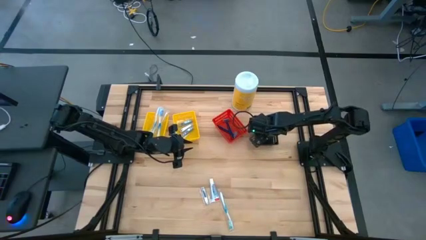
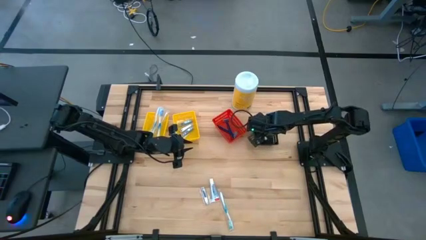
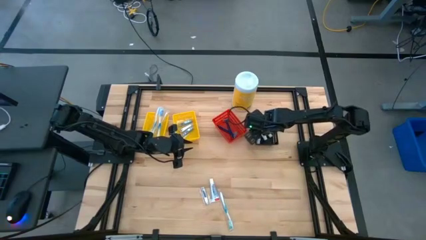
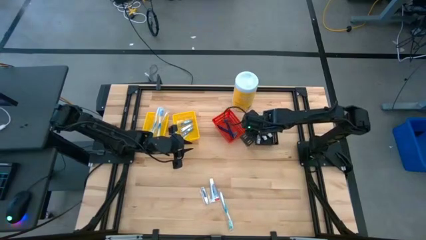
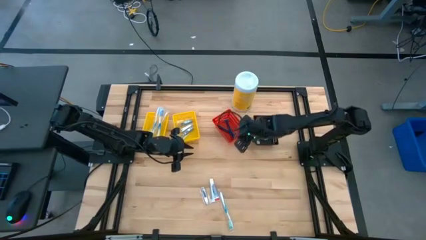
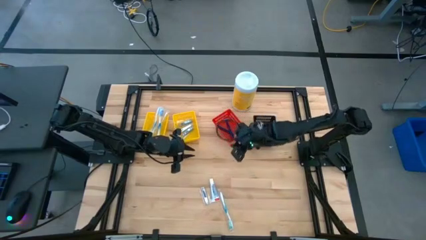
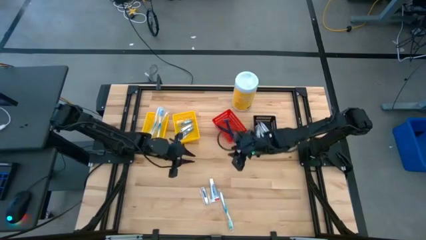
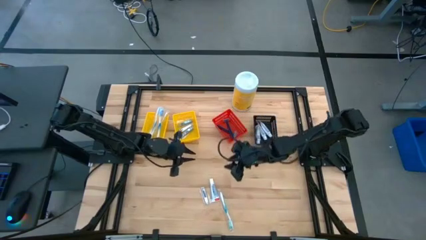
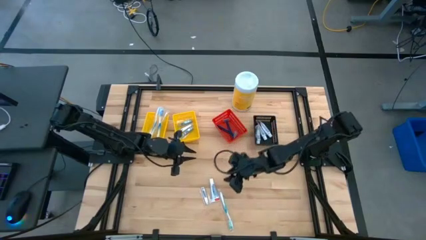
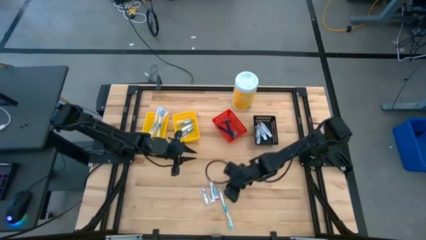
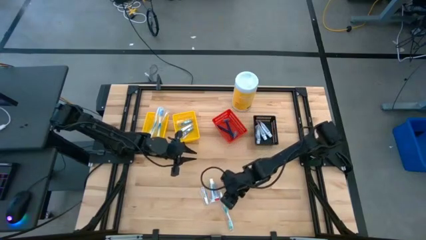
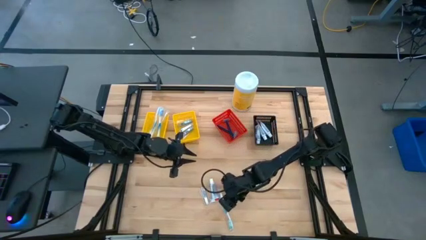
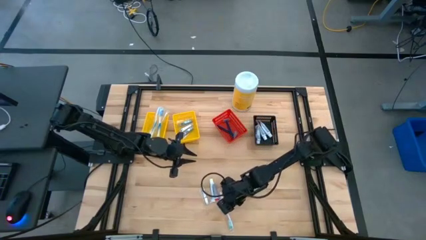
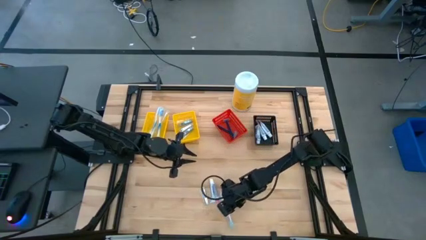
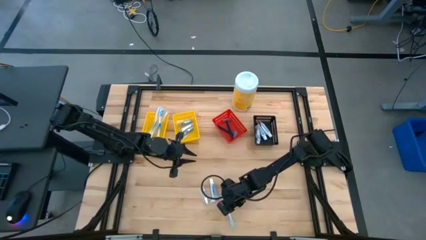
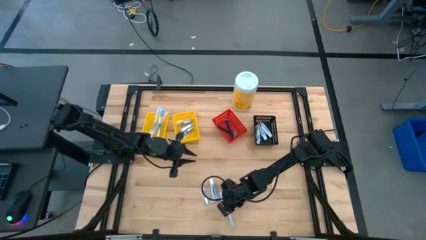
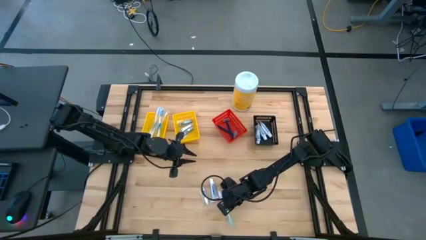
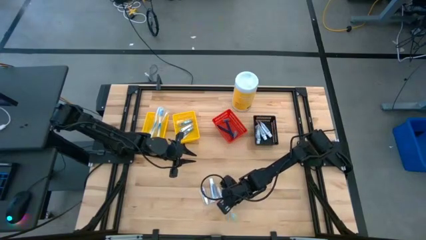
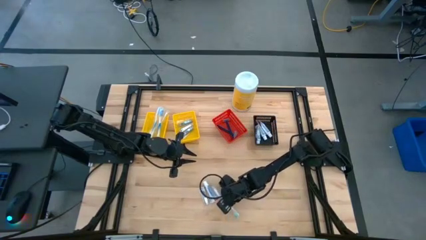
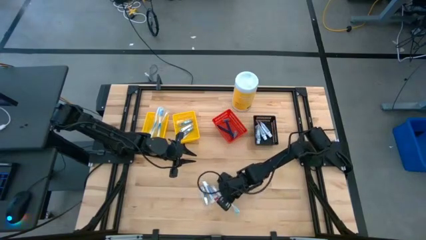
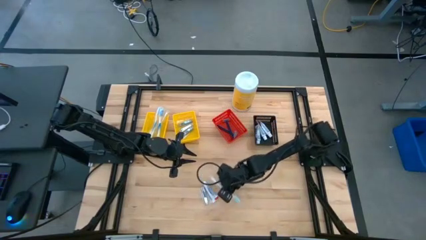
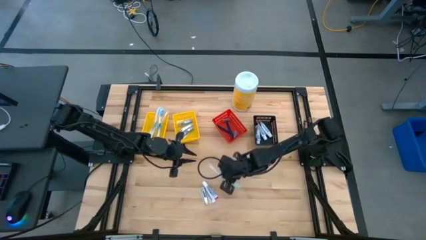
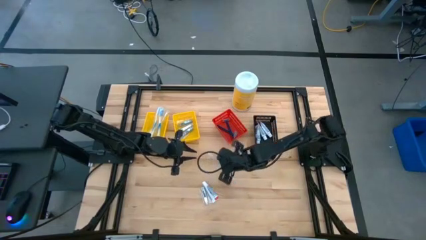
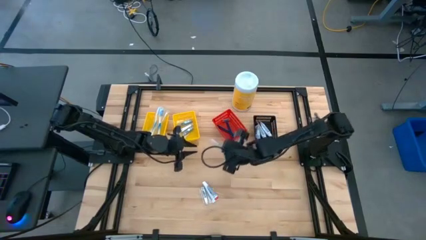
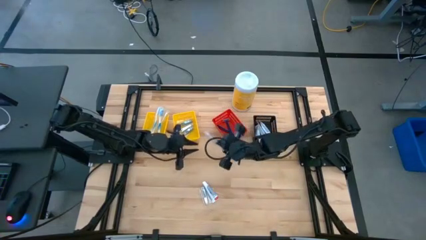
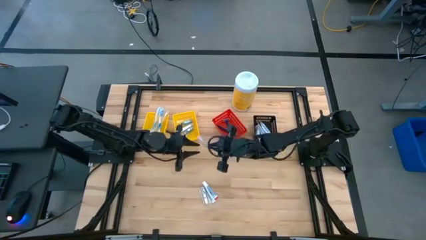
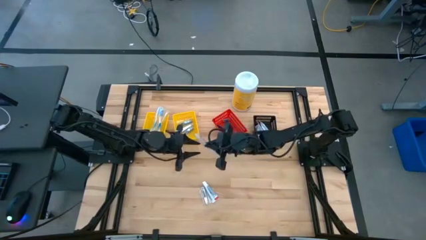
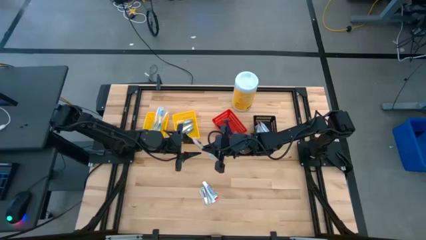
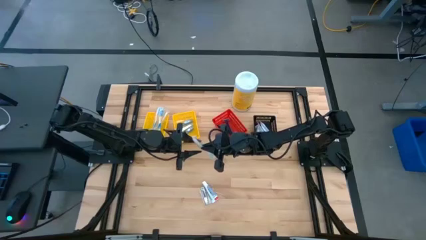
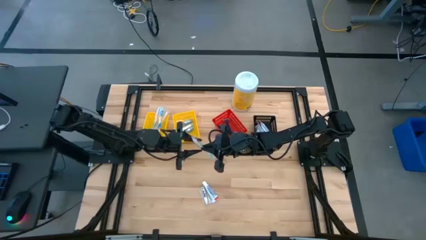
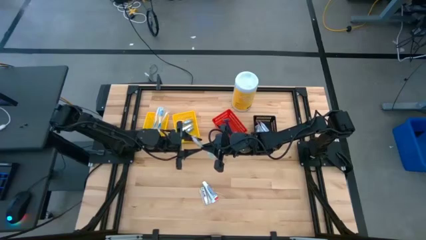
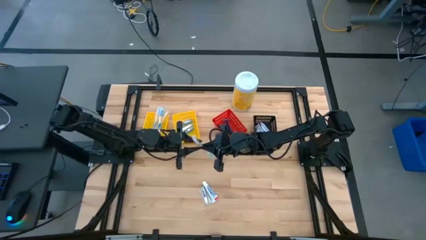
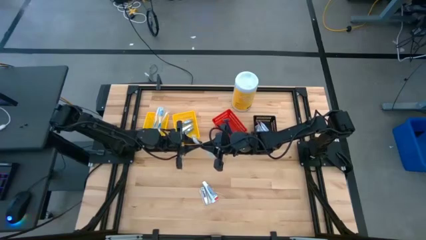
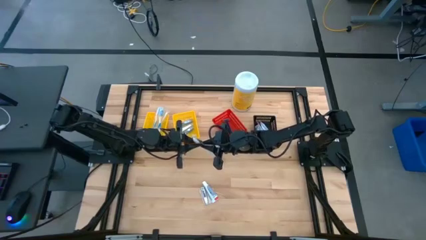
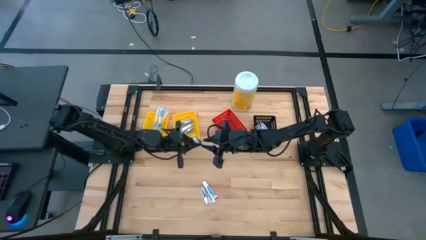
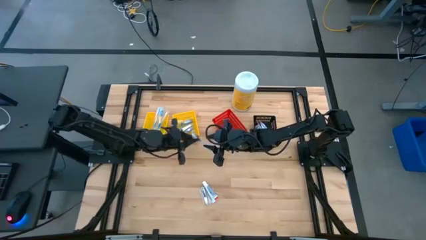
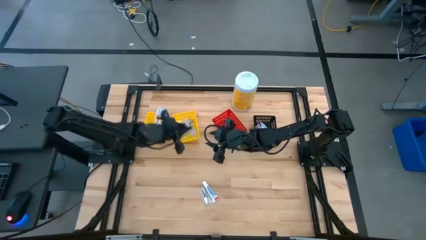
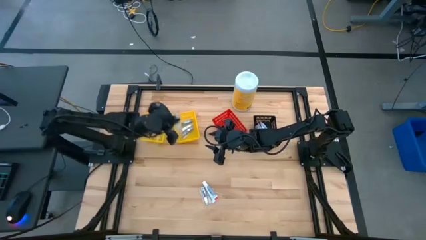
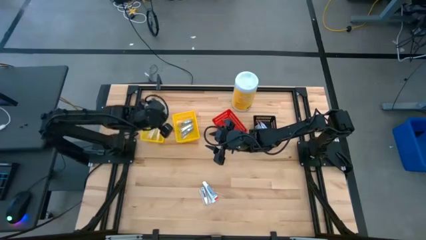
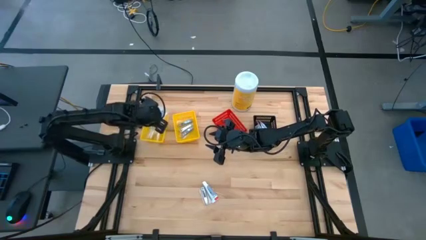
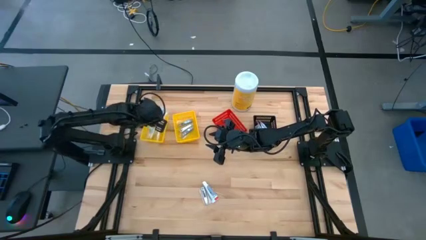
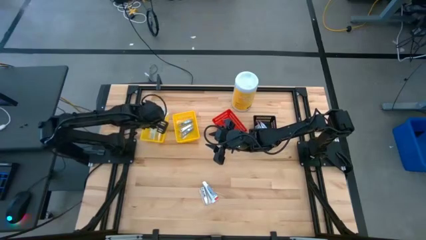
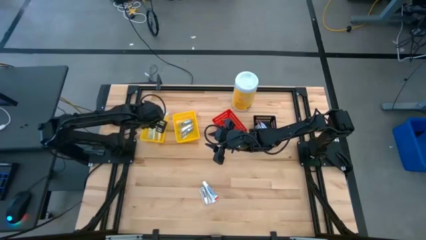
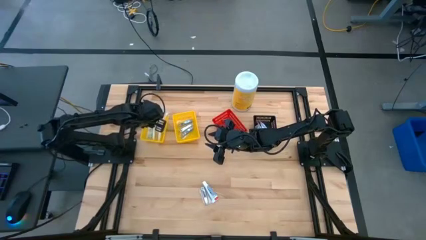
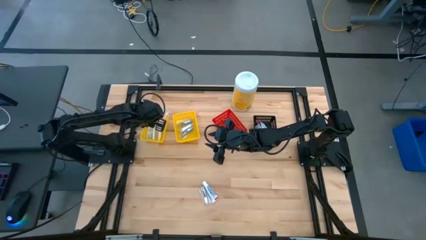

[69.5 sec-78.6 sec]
Task: Pick & Place Travel size toiletries
Put the green toothbrush into the left yellow bin

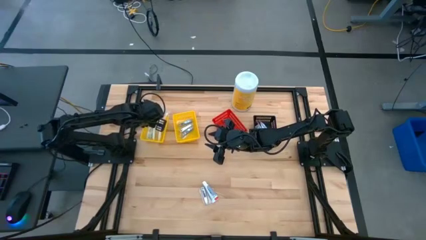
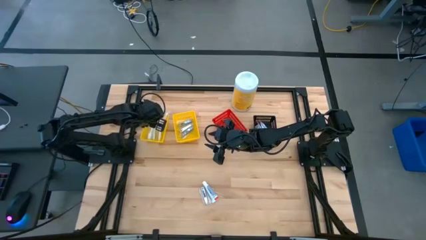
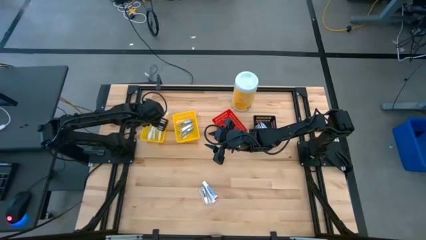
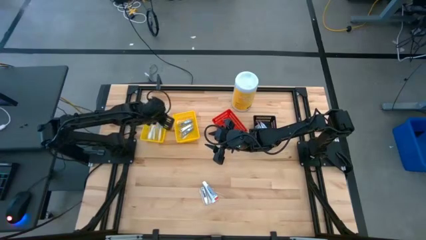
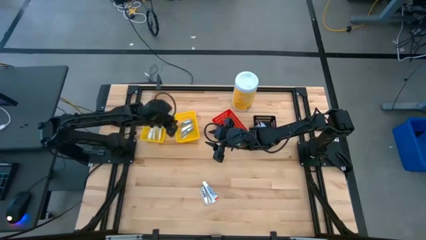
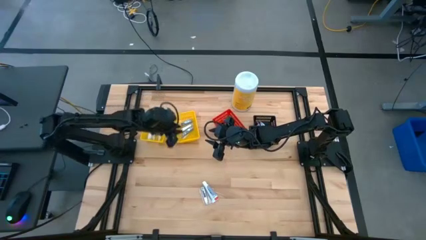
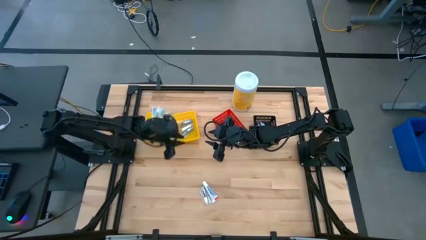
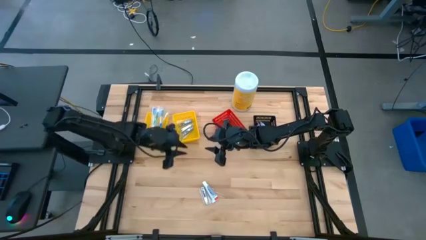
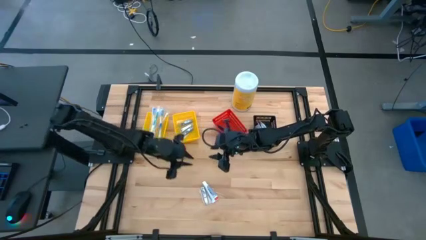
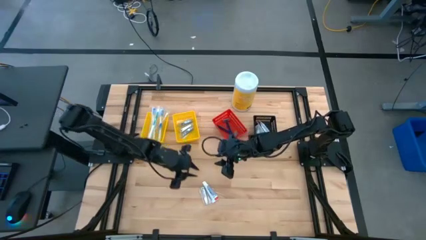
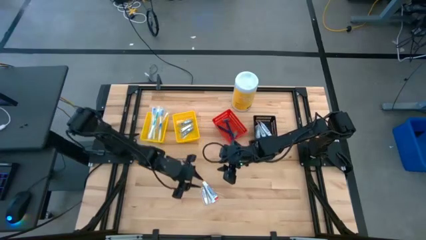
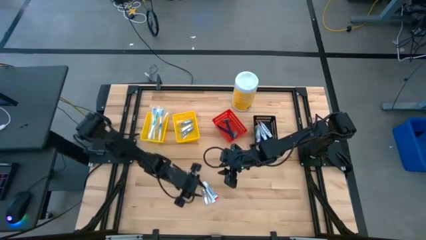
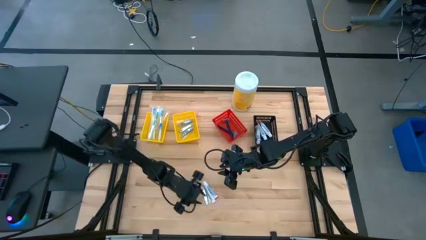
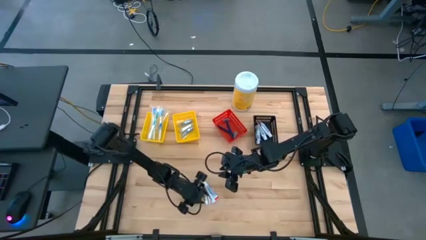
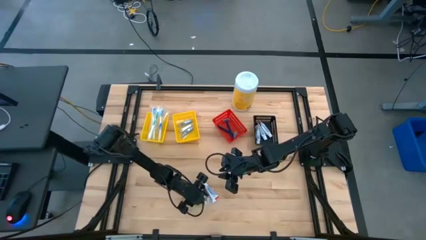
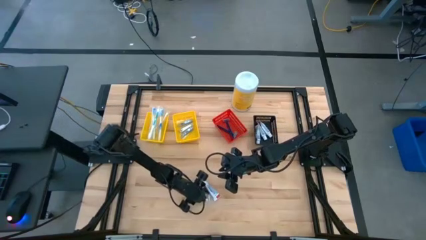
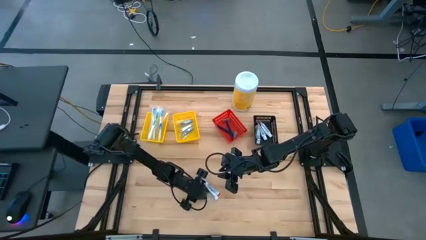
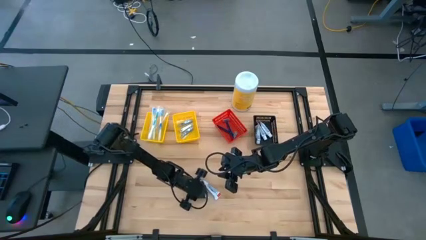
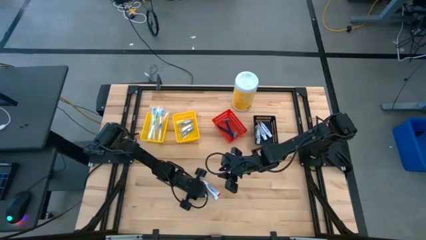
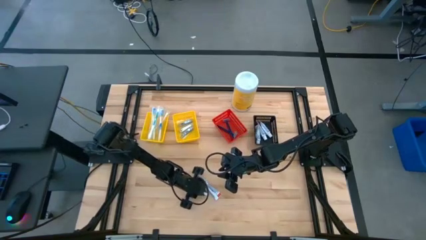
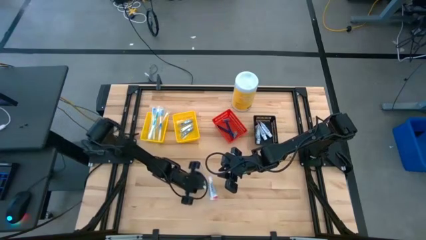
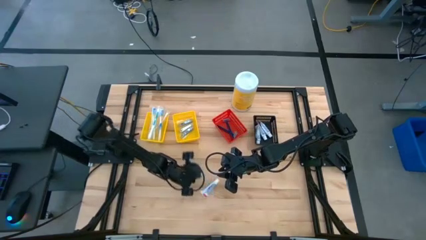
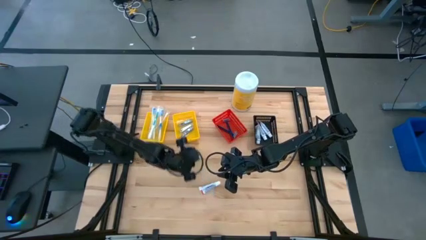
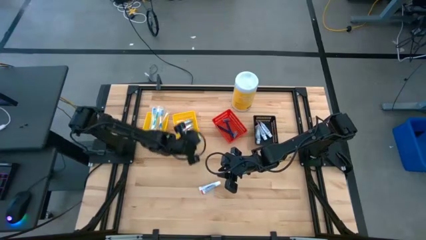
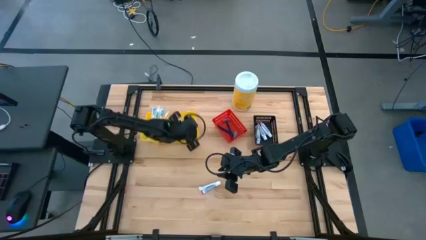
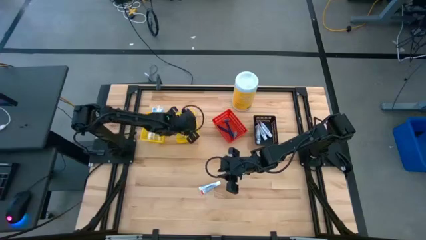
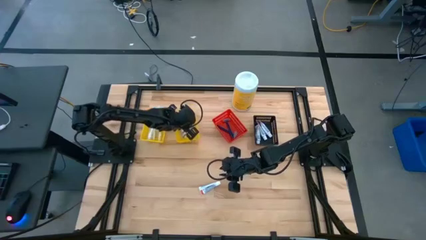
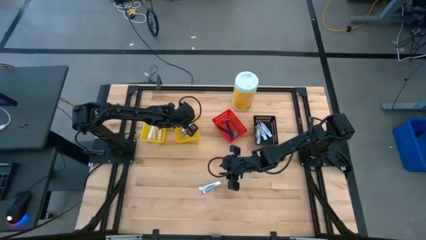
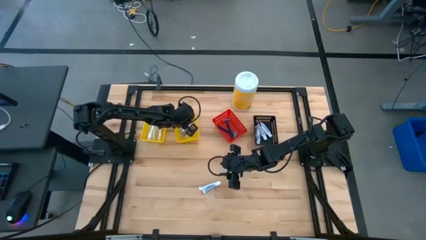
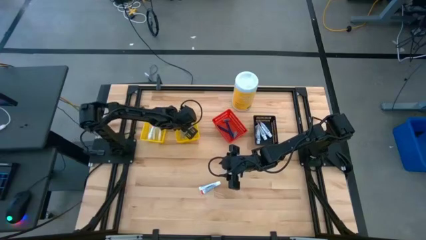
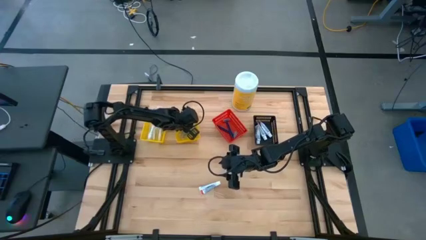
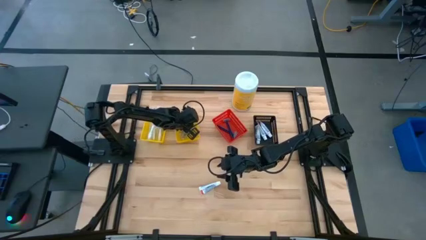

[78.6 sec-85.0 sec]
Put the silver nail cutter into the right yellow bin

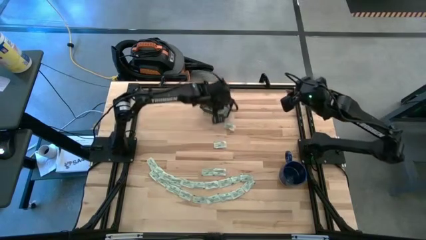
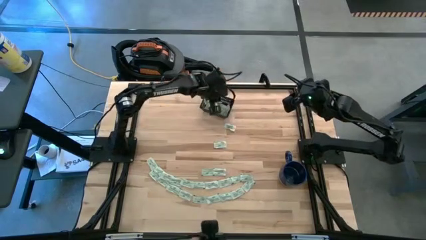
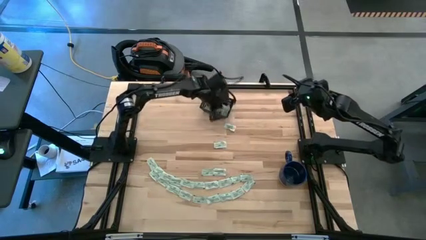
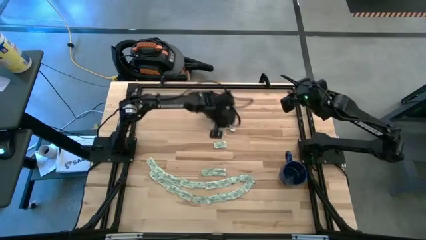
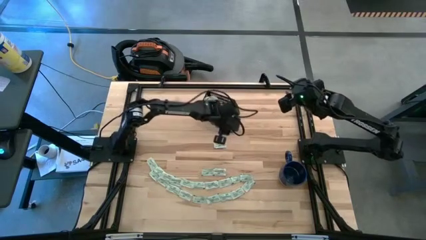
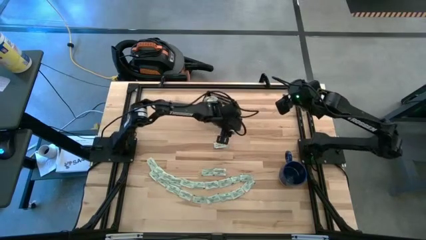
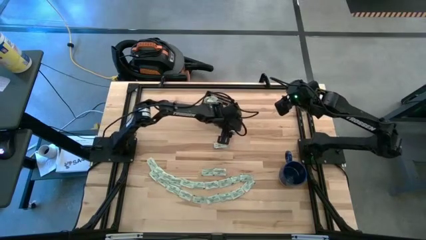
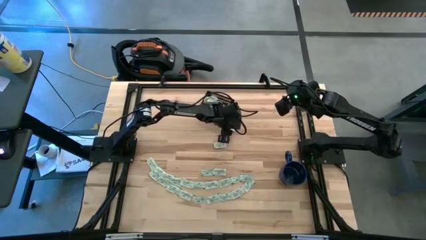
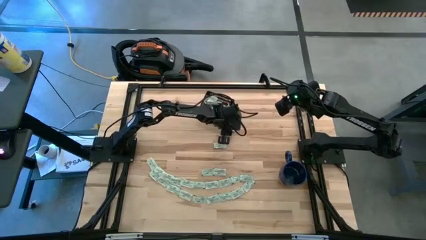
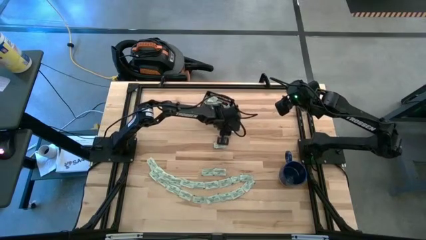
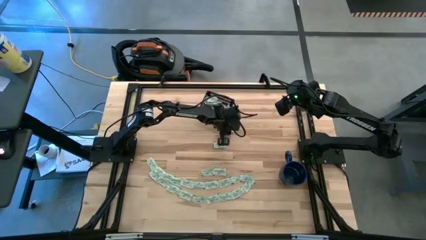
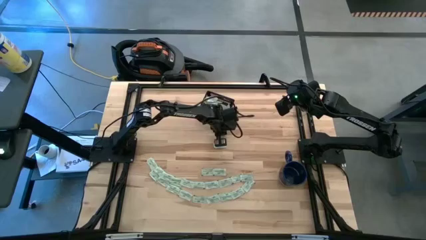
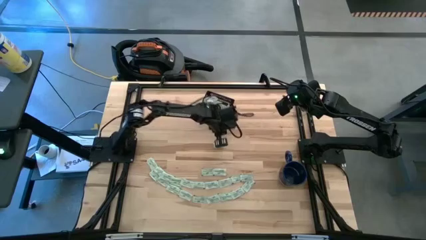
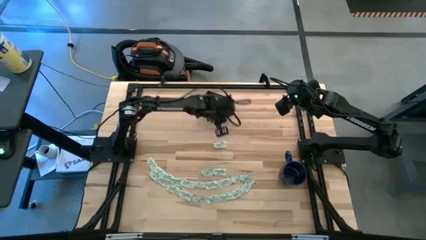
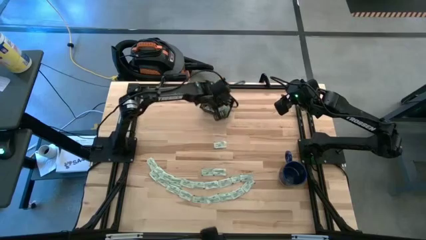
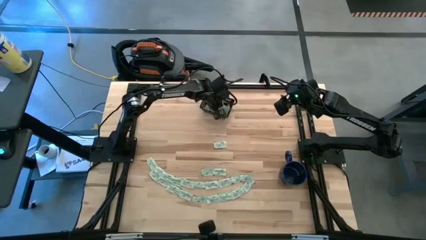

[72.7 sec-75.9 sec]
Task: Pick and place Stevia / Truvia into bins
Put the stevia packet into the black bin
